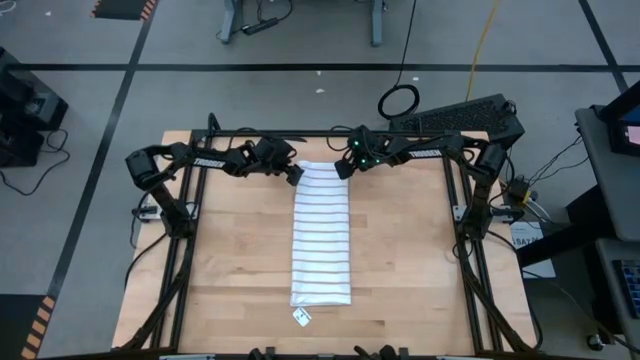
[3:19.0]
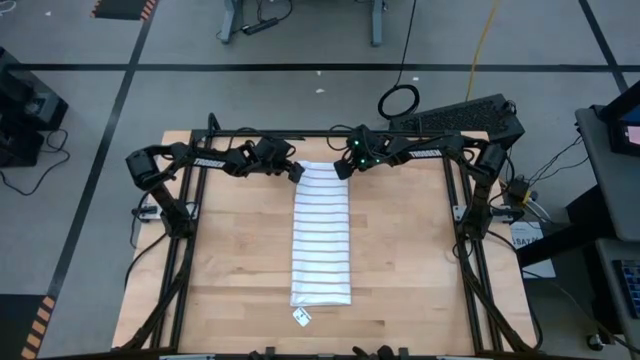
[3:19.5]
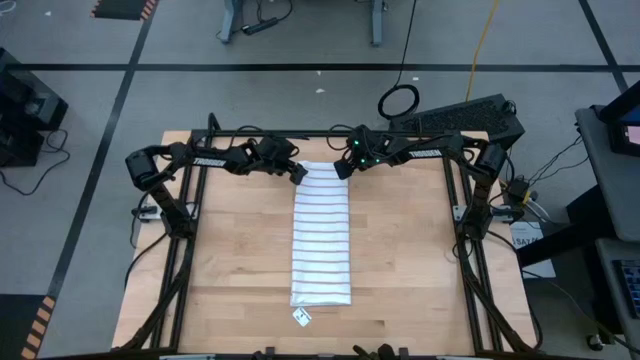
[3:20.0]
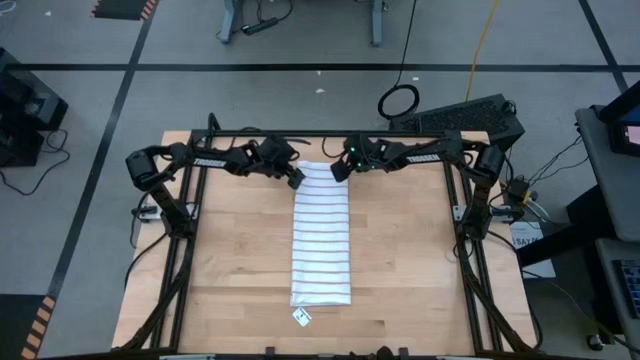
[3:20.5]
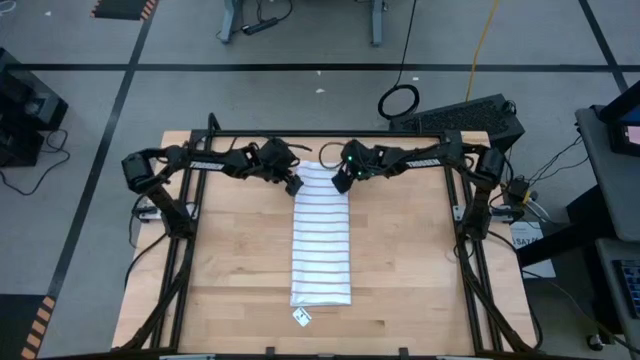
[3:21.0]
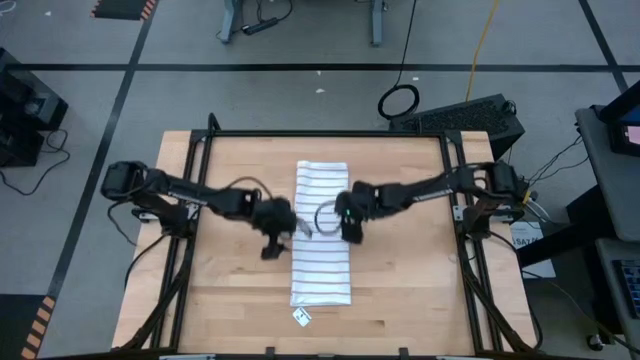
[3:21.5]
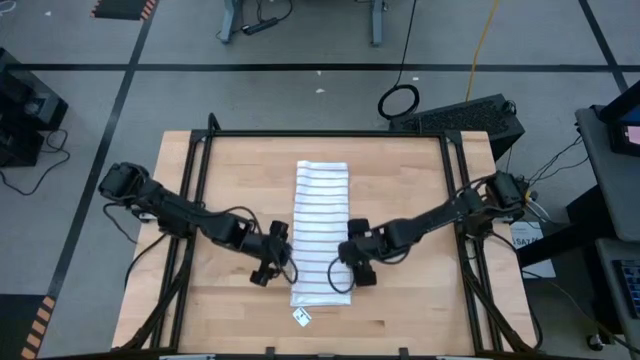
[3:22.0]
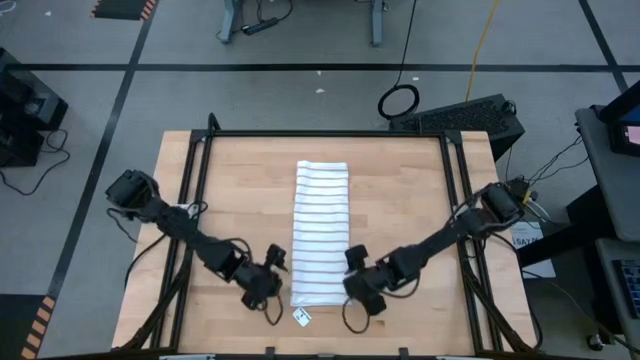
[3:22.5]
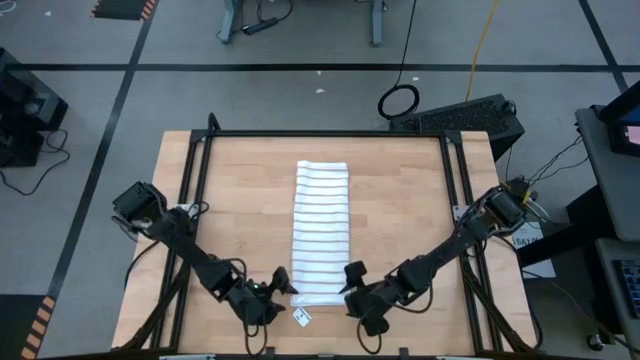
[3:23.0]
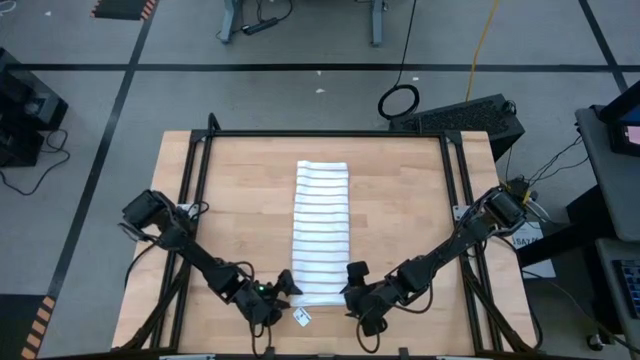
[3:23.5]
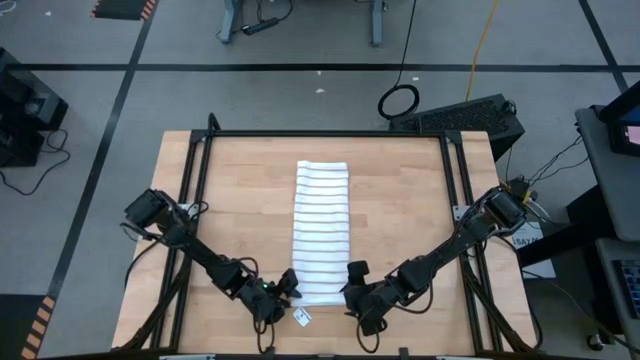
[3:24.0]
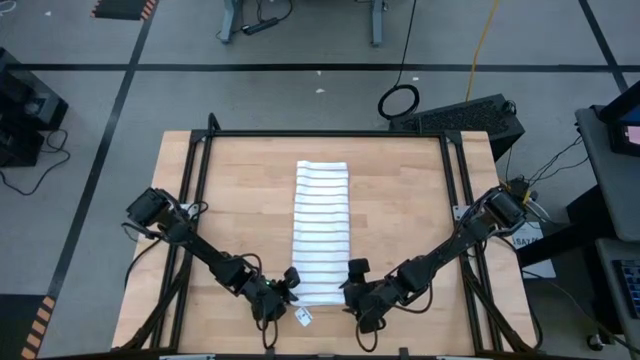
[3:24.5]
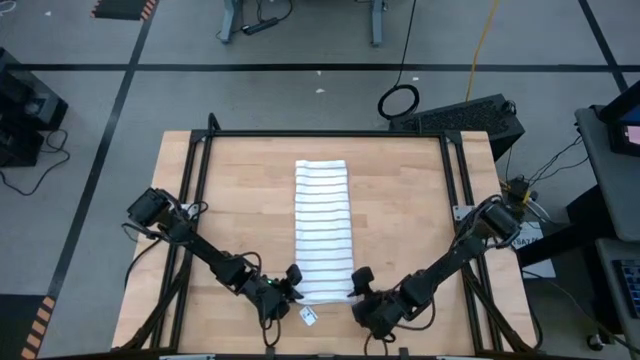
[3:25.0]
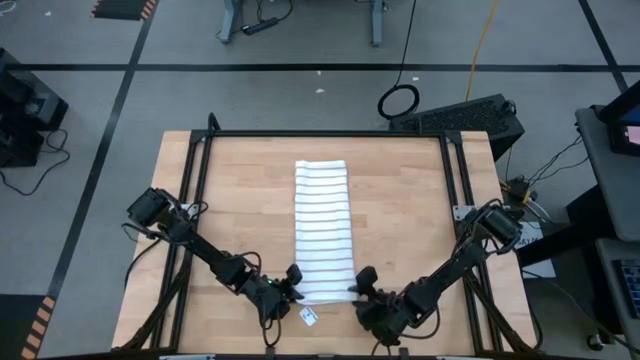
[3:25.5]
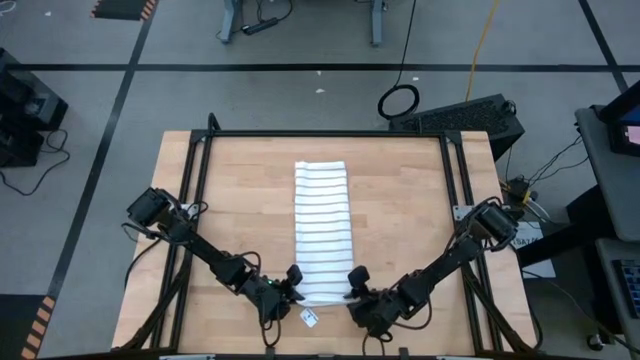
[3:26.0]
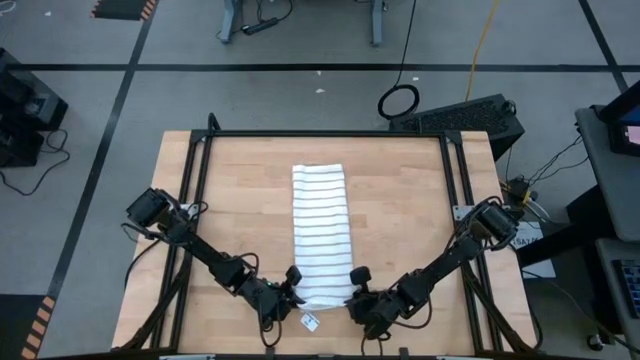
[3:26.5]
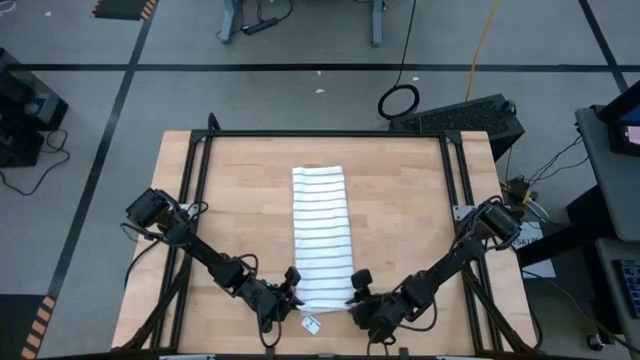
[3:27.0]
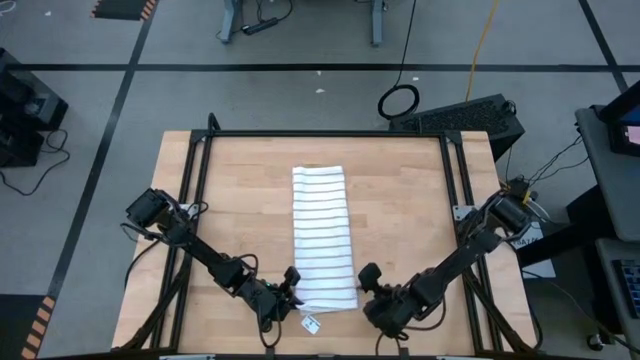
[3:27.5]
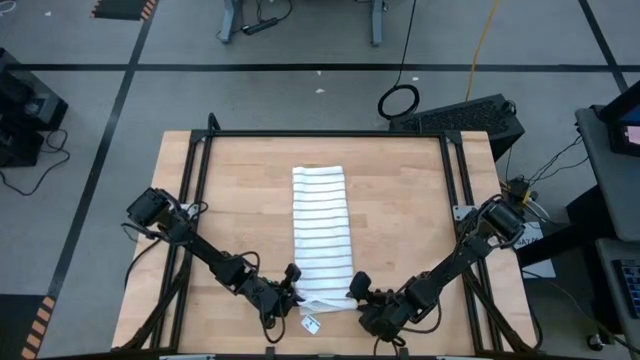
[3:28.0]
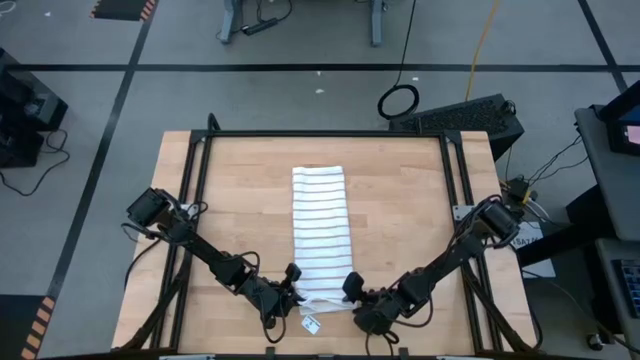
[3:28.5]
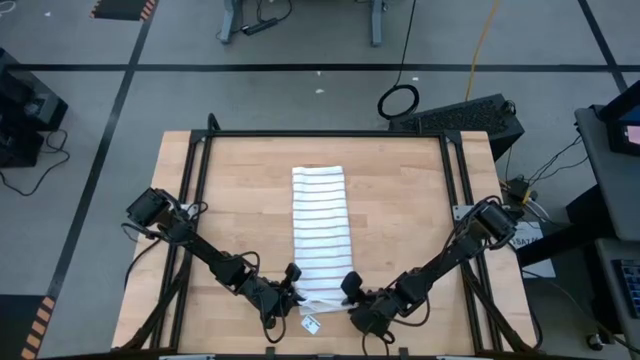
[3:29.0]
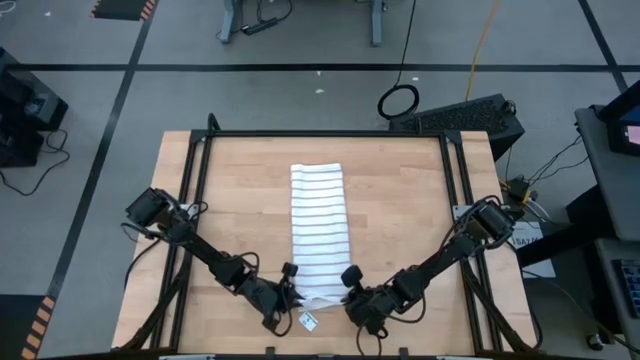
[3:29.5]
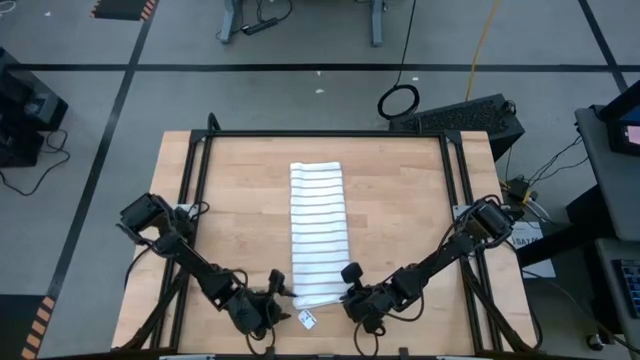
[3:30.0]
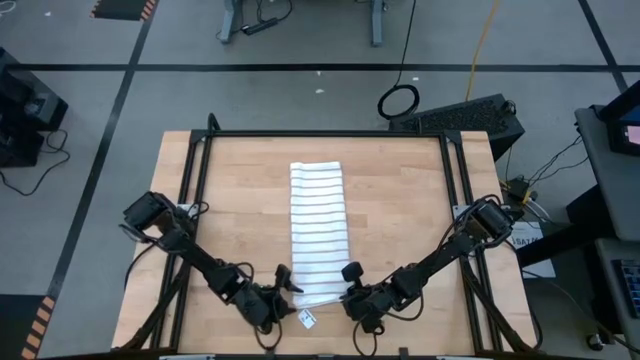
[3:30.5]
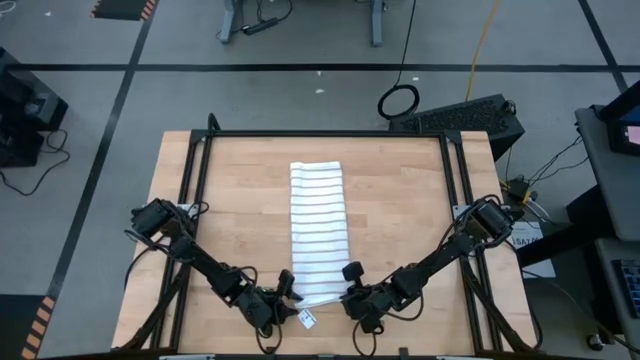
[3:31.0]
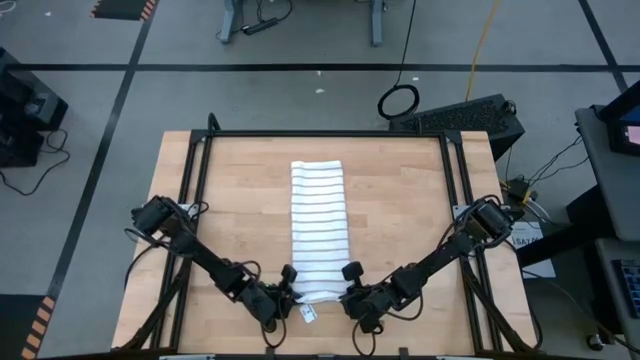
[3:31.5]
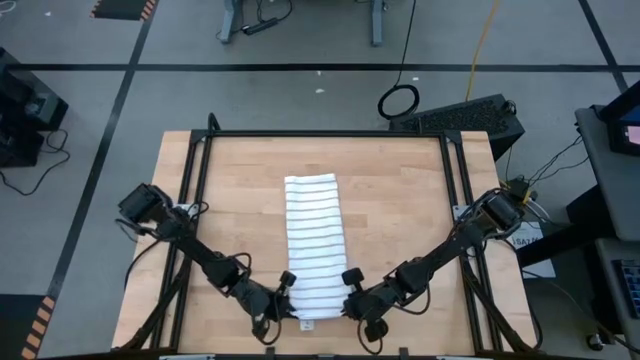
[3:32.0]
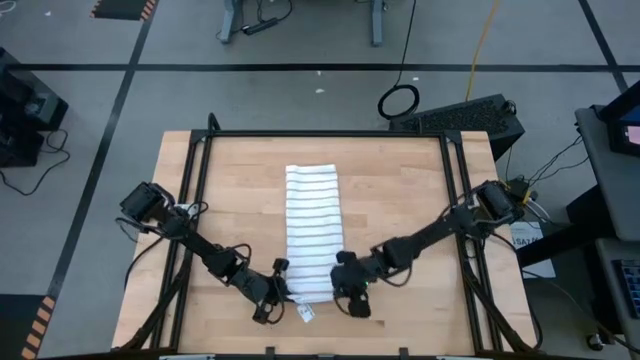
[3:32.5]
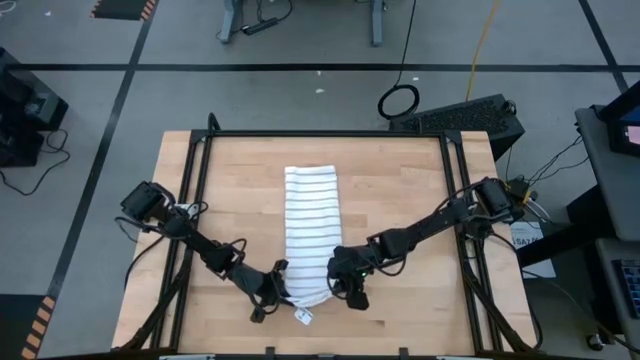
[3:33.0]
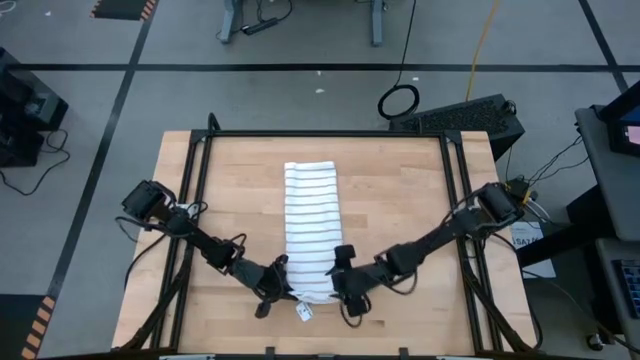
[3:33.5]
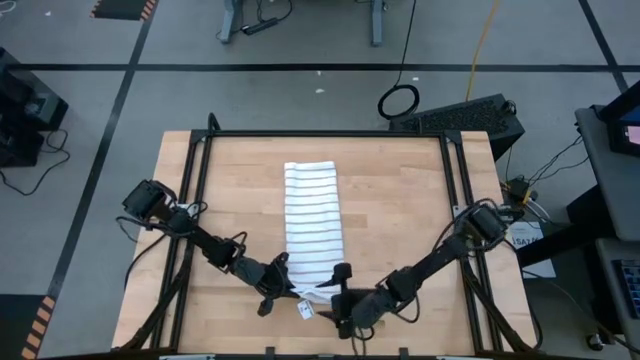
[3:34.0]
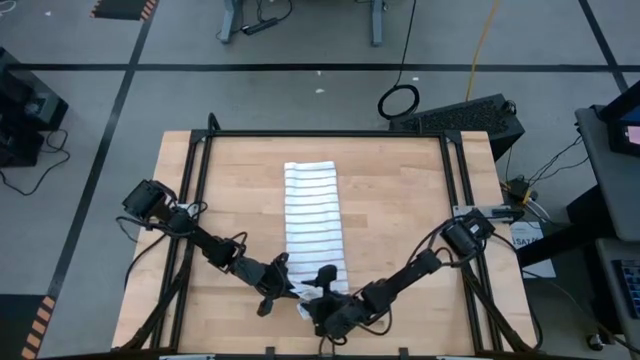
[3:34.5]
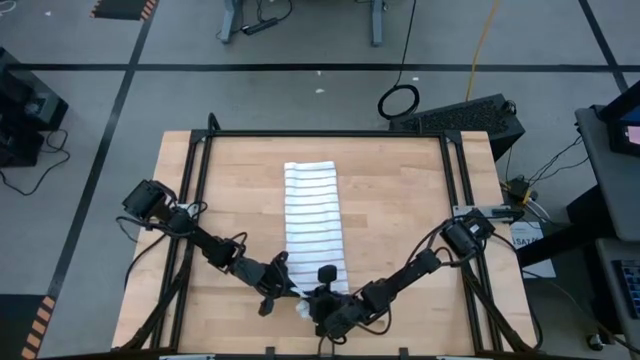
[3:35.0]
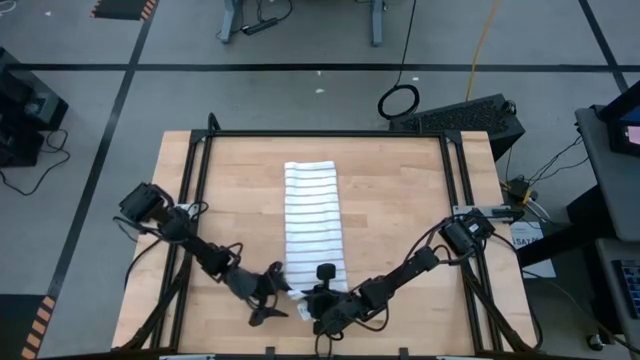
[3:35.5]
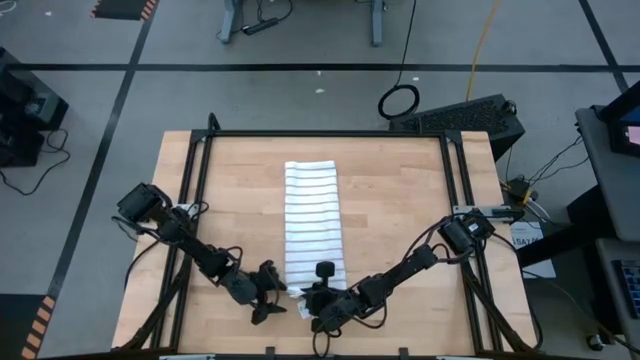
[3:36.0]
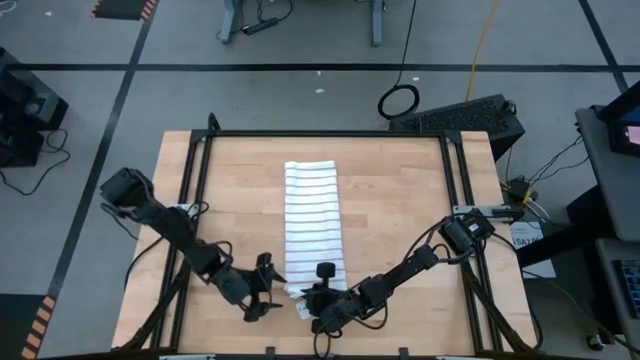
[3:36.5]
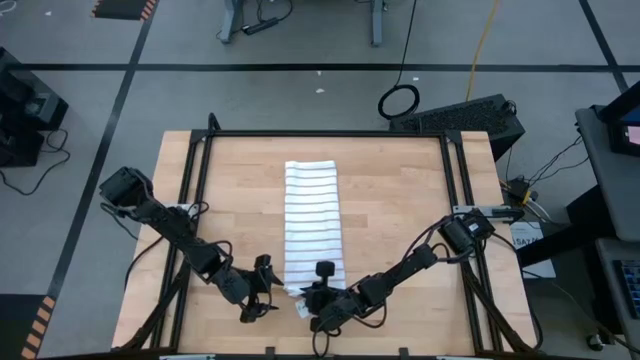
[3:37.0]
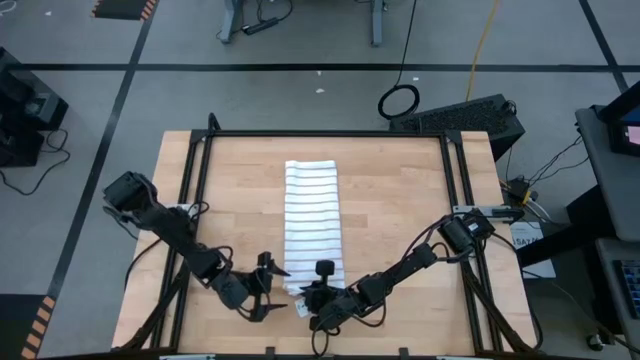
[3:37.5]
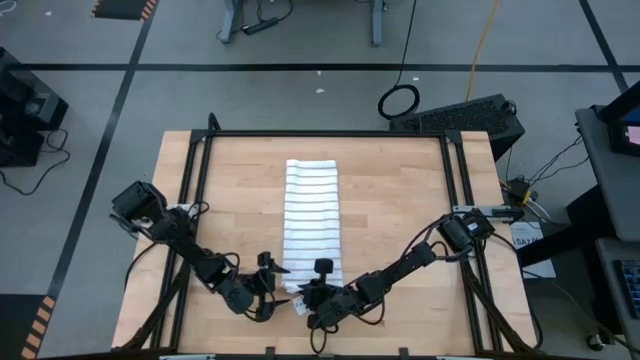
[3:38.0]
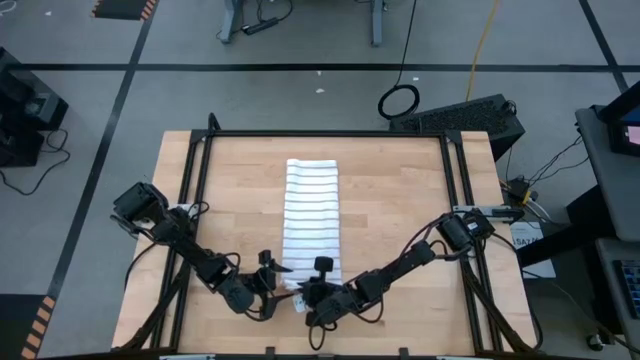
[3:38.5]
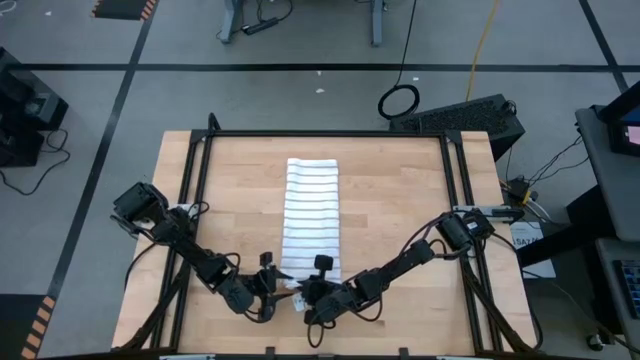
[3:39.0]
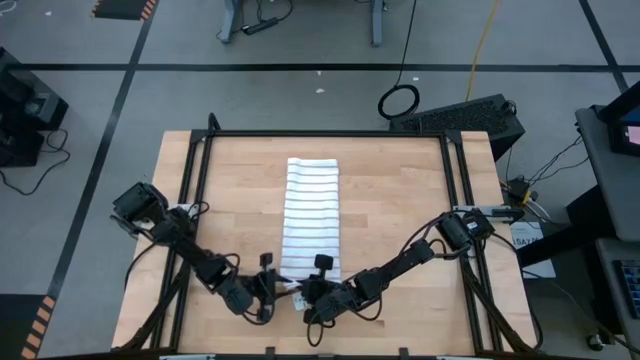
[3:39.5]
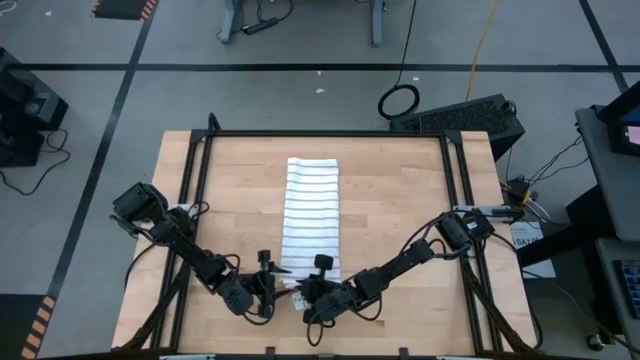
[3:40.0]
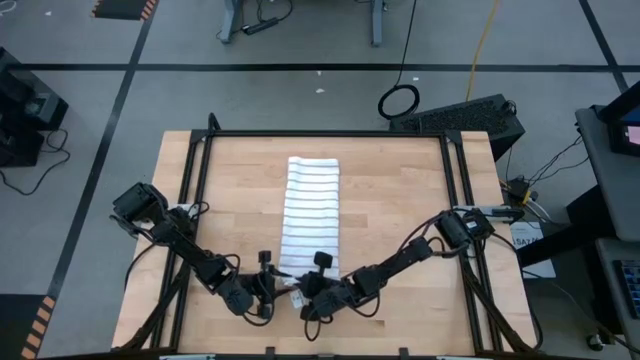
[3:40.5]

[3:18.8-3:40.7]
Task: Roll towel
Roll the white towel
